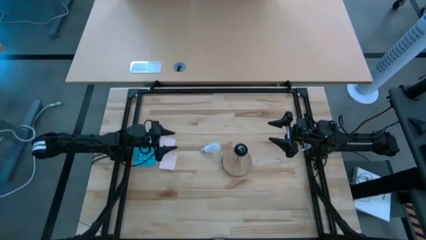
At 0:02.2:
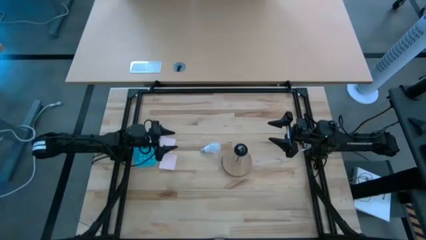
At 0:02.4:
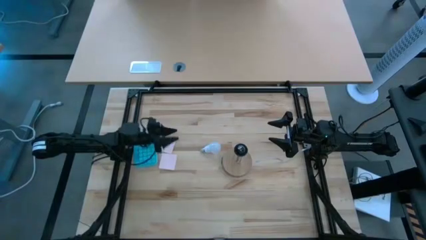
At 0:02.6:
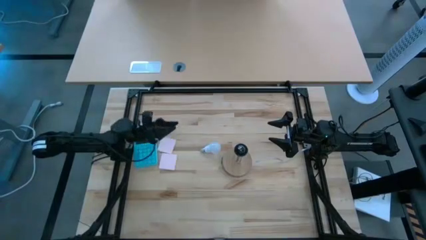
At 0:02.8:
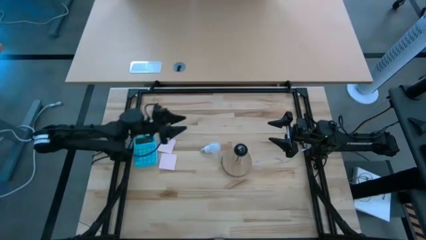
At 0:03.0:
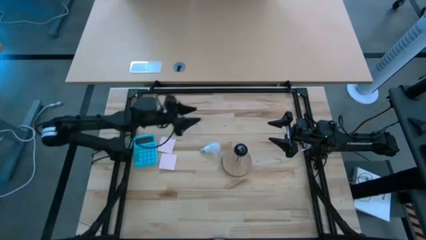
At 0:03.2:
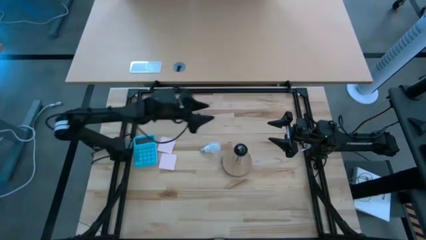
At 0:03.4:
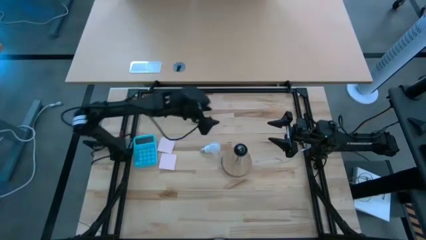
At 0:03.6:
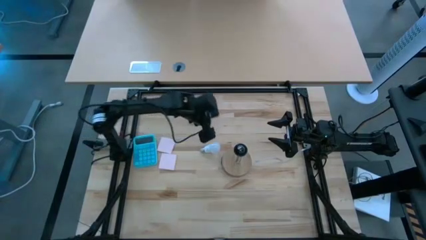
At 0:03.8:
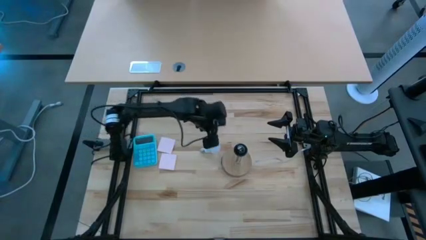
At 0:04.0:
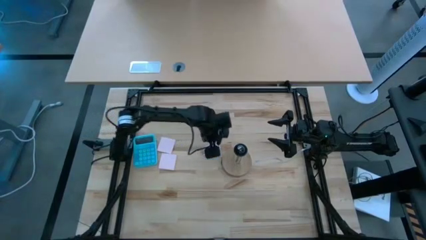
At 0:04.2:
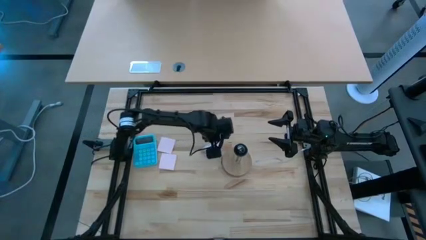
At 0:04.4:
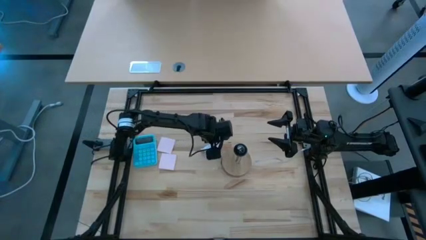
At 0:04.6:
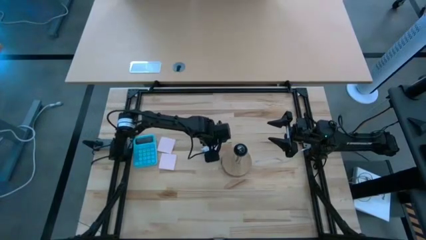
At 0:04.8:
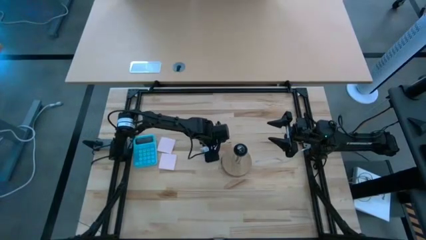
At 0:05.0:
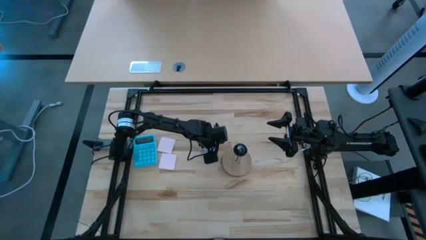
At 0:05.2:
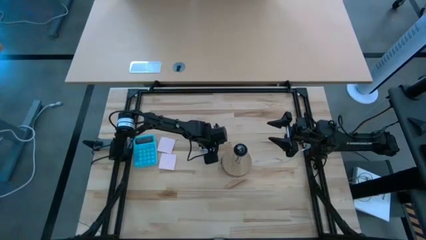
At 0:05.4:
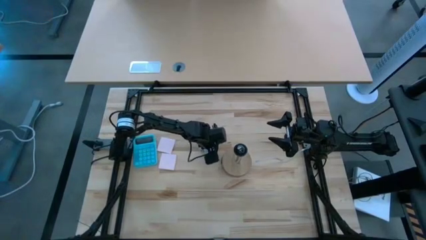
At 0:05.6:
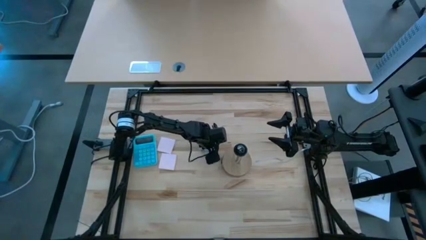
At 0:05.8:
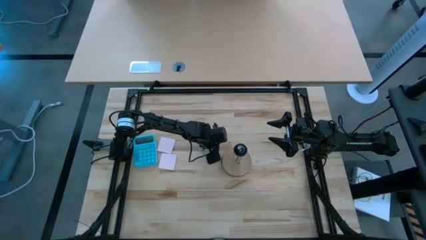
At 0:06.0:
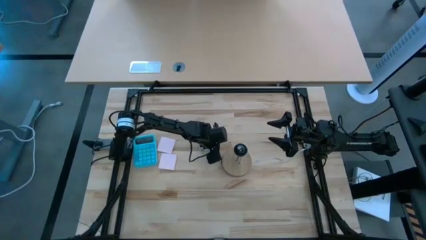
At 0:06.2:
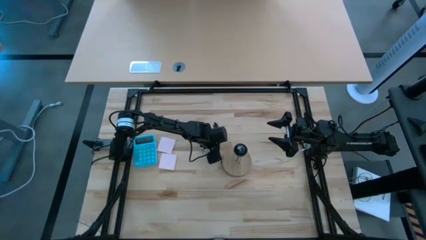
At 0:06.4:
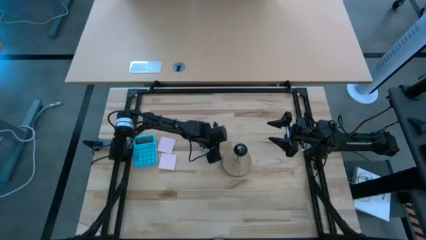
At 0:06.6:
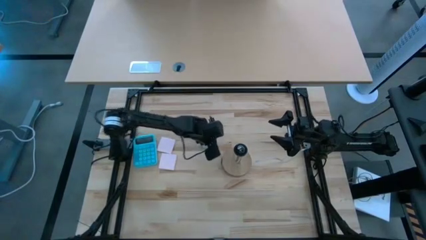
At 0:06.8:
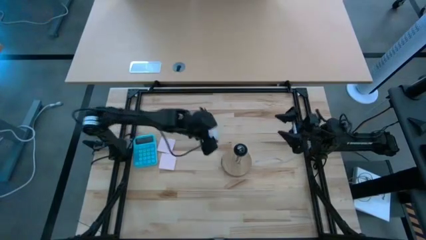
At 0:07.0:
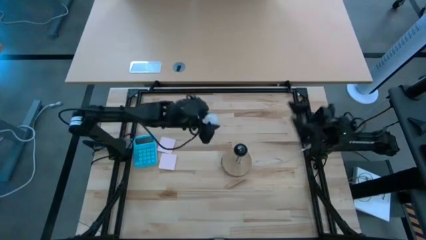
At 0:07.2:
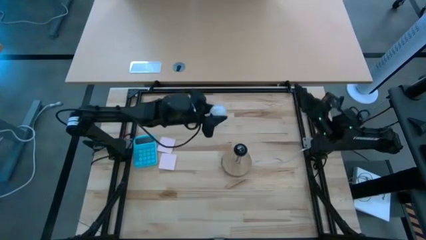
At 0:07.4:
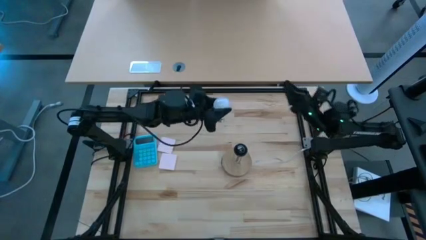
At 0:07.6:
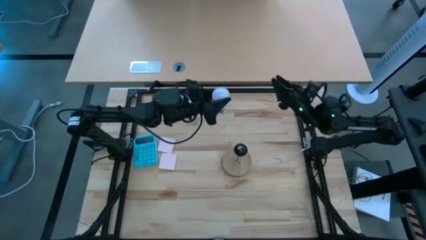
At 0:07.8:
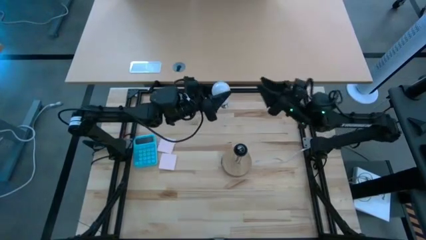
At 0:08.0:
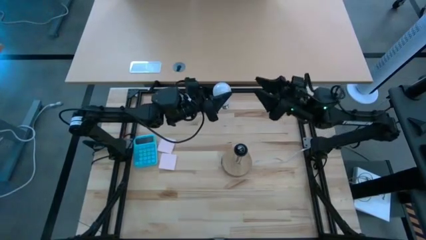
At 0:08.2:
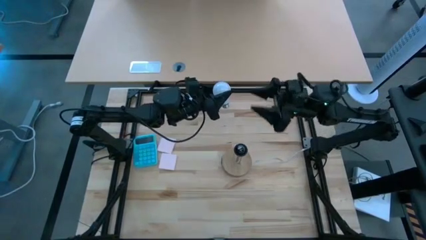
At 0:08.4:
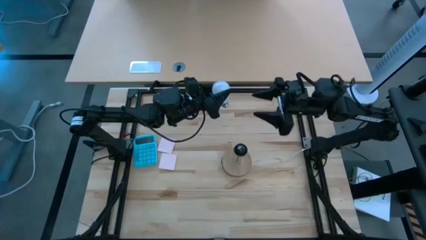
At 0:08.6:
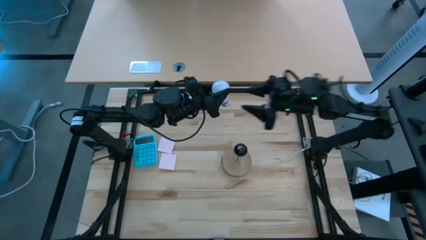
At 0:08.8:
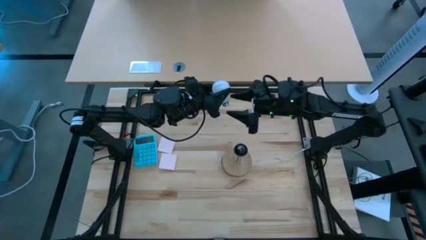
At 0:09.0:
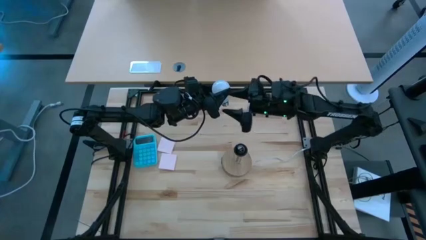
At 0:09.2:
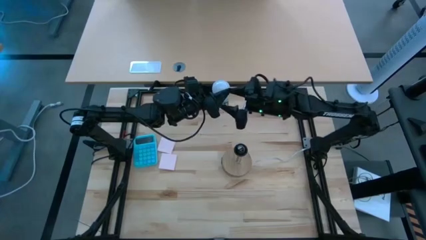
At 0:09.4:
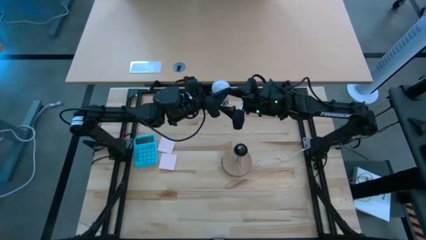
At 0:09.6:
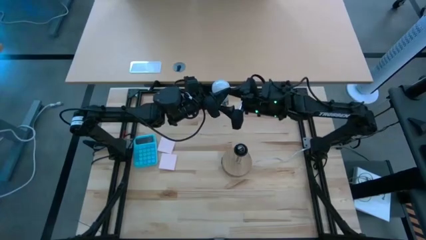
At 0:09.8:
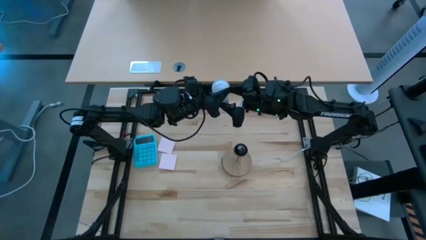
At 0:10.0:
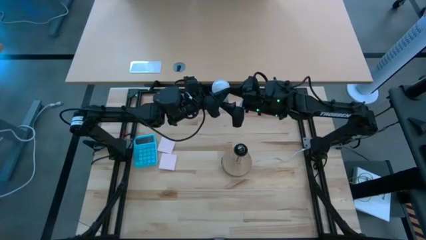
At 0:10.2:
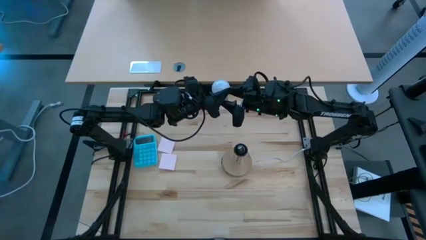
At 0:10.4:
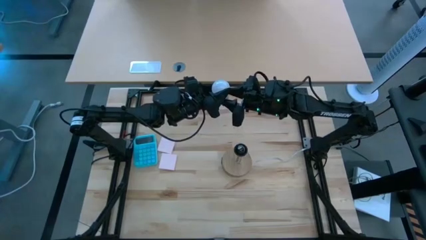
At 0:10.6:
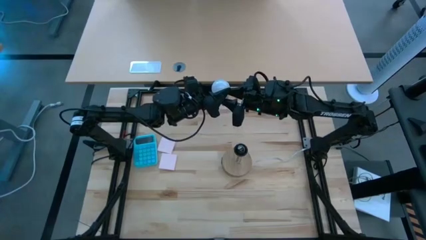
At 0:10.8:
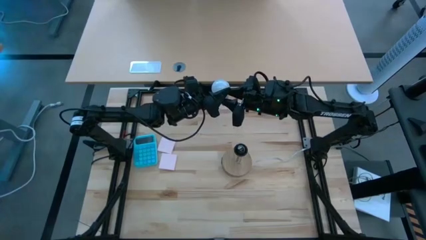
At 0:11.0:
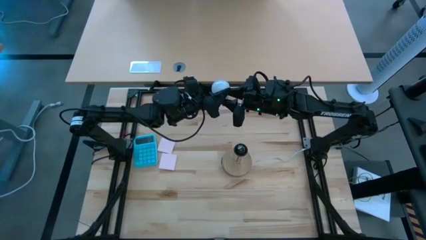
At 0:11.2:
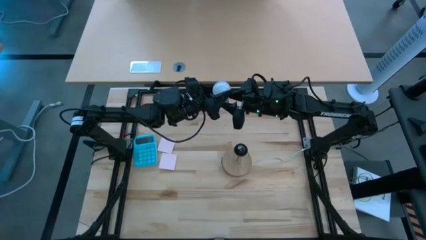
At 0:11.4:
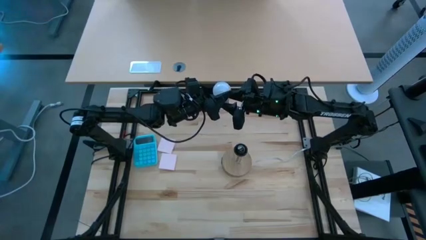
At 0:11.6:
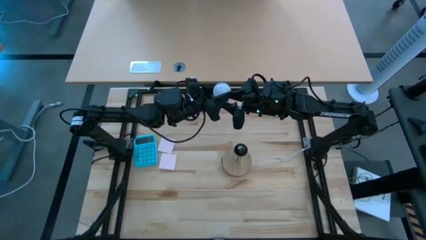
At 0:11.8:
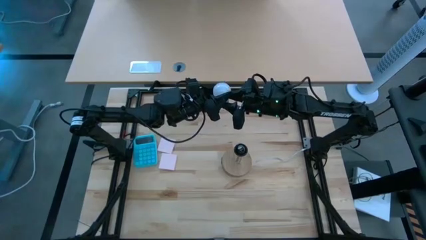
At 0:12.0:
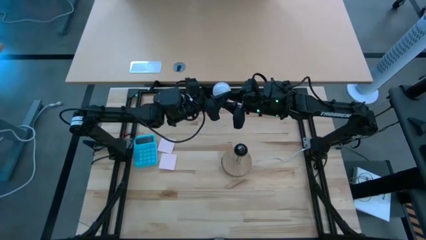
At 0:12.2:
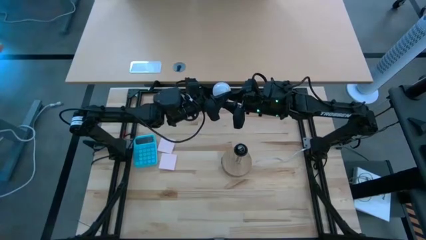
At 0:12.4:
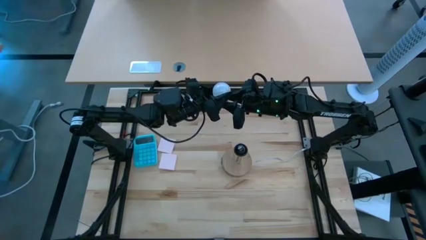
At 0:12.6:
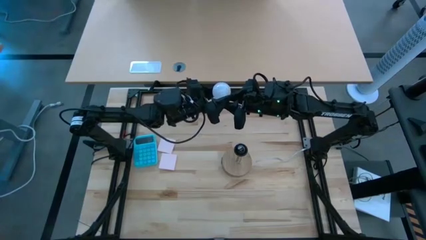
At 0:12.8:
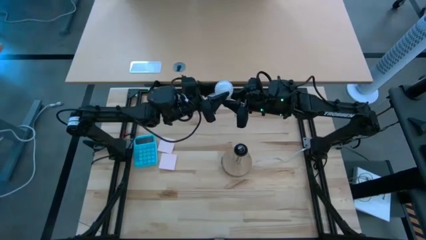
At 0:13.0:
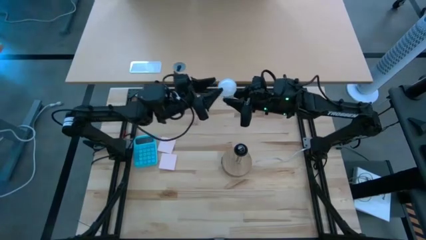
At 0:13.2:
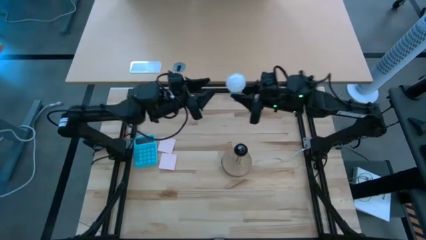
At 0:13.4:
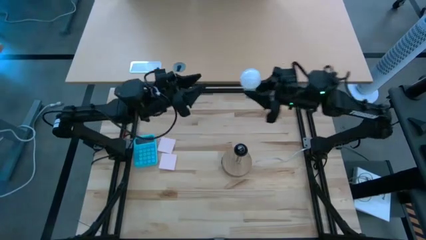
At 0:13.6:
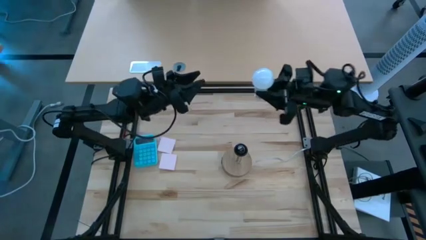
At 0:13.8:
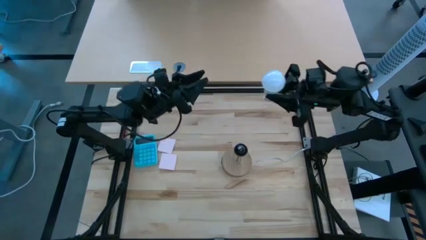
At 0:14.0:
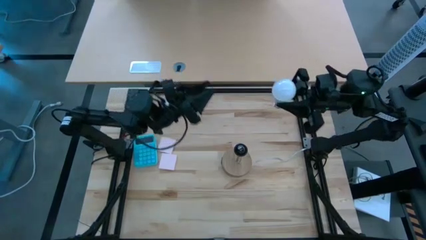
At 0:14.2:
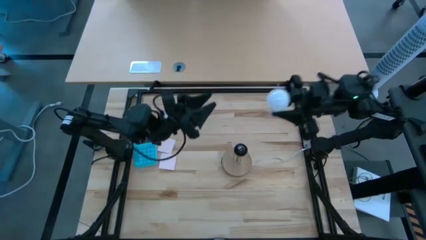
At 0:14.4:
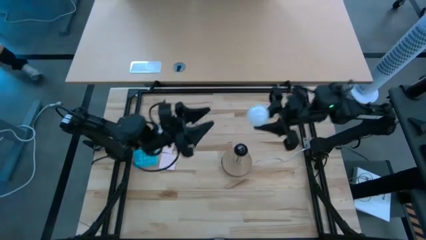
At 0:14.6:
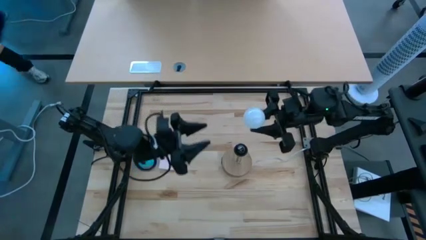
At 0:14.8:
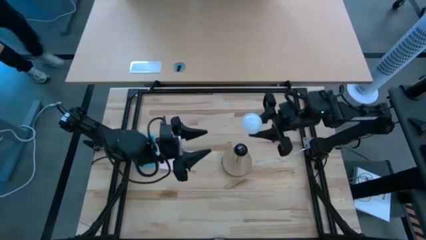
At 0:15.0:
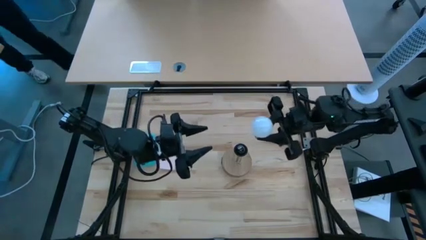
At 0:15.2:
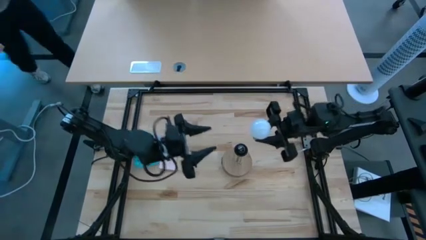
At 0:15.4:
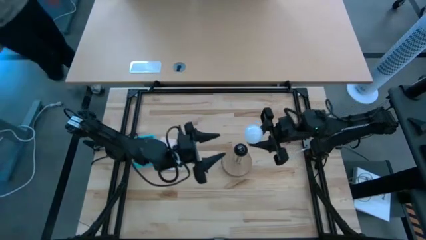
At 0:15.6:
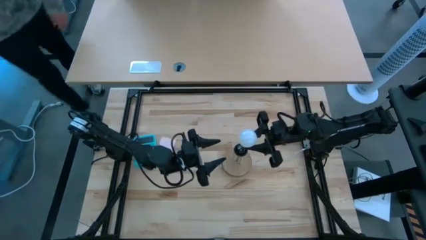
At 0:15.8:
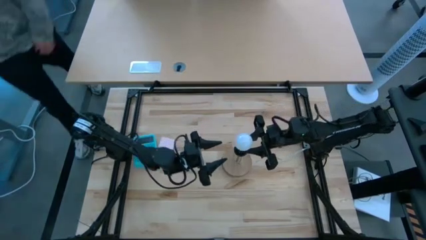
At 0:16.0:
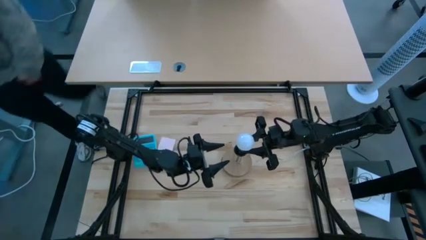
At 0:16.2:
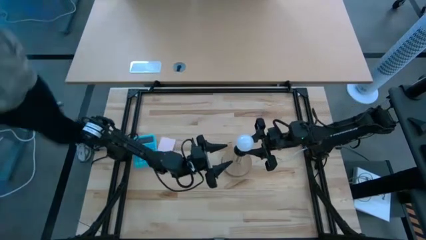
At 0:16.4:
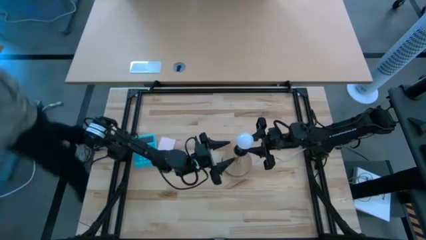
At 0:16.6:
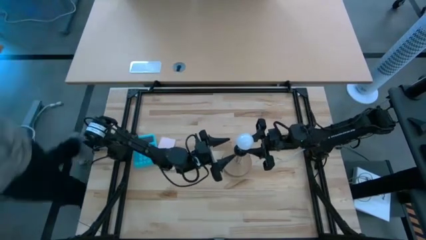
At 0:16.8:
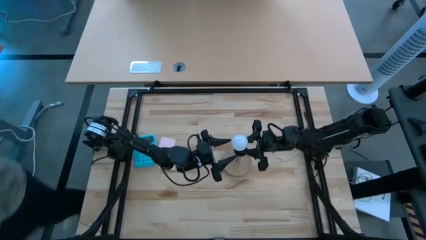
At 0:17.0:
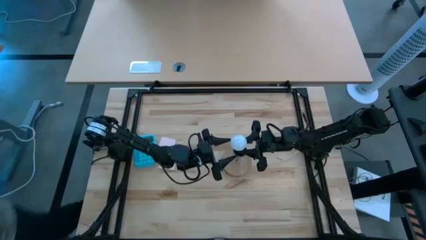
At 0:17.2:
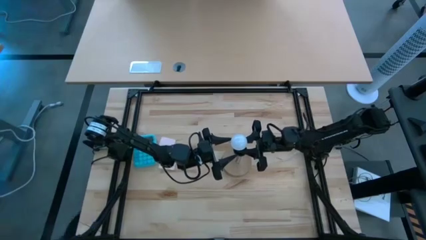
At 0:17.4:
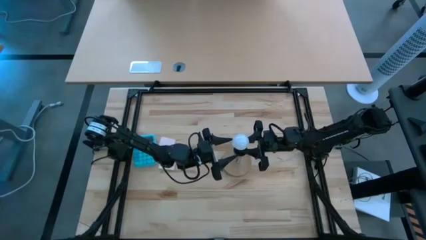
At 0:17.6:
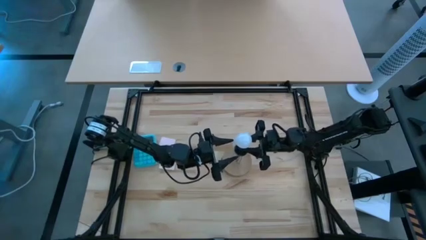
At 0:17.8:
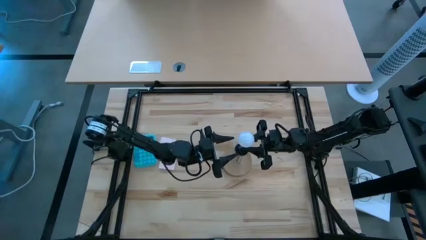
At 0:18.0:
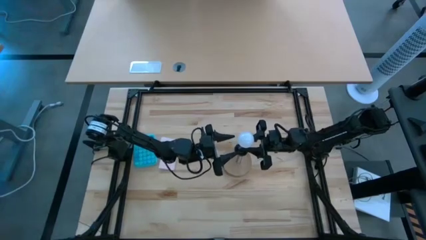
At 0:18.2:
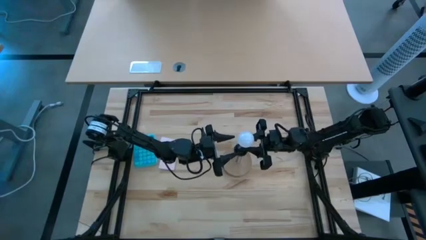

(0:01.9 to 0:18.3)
Task: Screw lightbulb
Insert the lightbulb into the lamp
